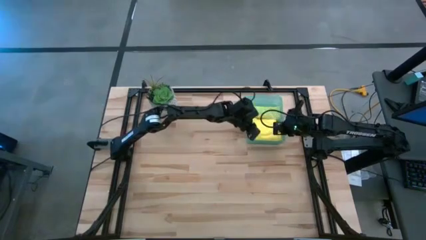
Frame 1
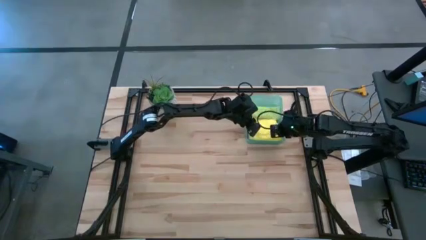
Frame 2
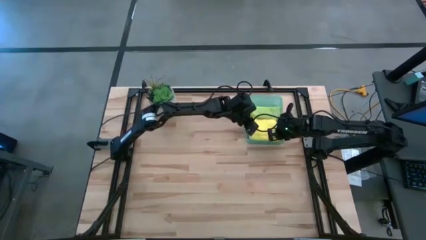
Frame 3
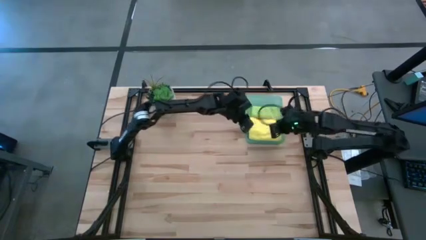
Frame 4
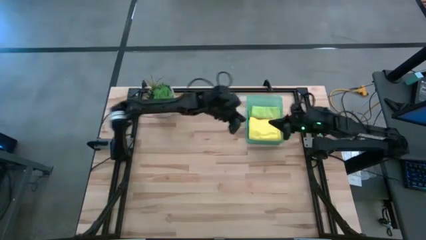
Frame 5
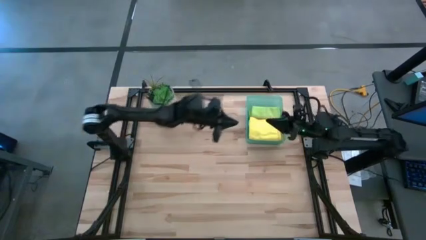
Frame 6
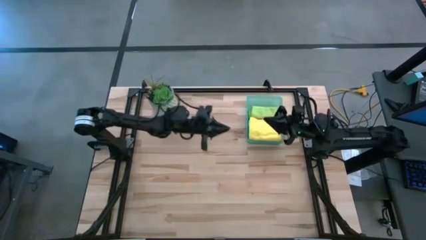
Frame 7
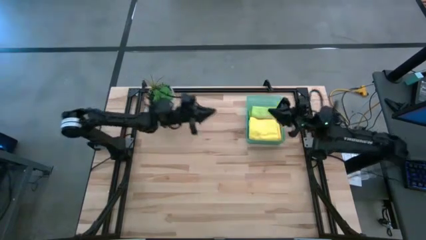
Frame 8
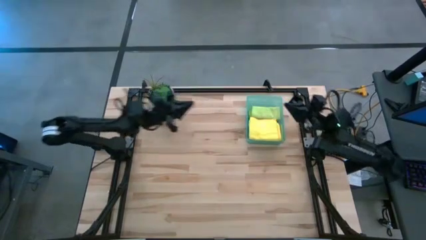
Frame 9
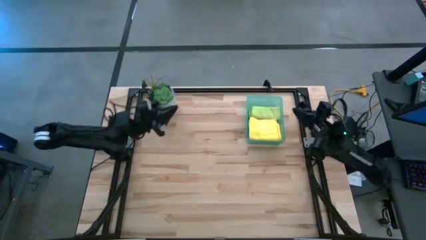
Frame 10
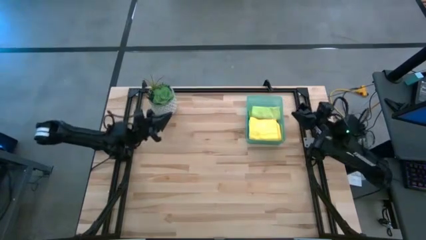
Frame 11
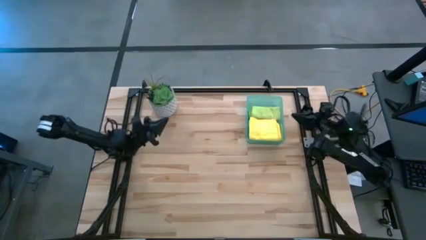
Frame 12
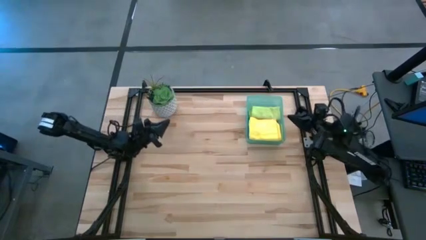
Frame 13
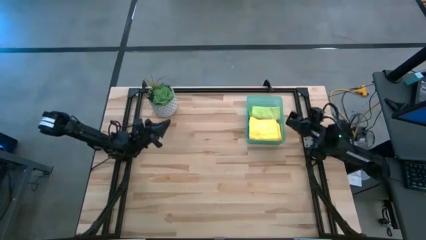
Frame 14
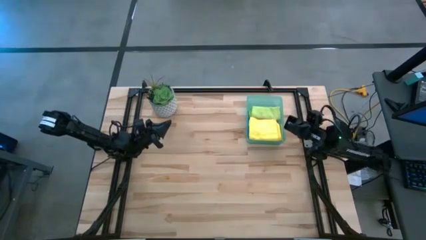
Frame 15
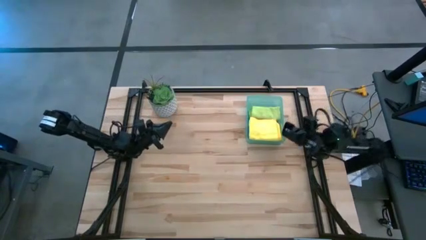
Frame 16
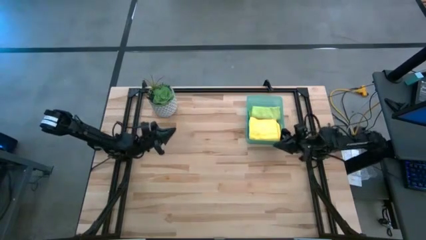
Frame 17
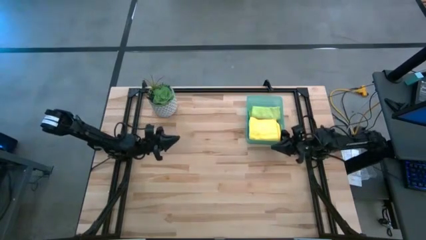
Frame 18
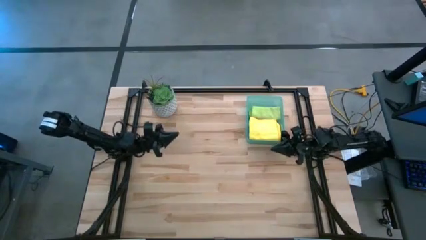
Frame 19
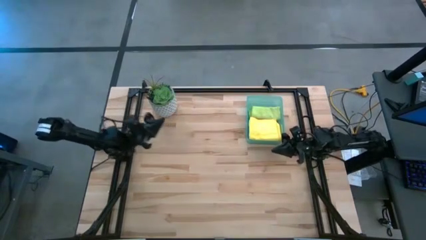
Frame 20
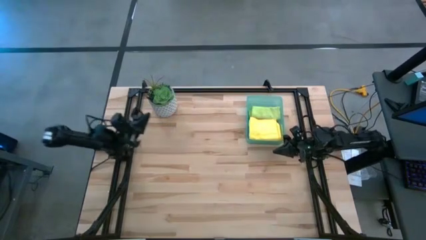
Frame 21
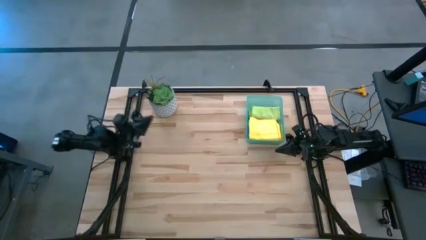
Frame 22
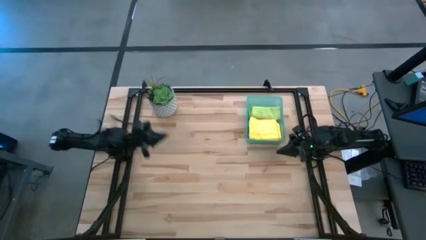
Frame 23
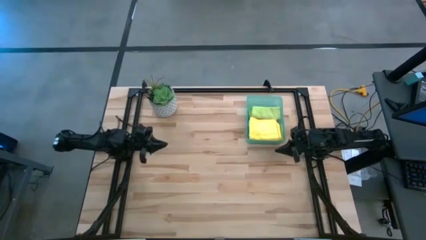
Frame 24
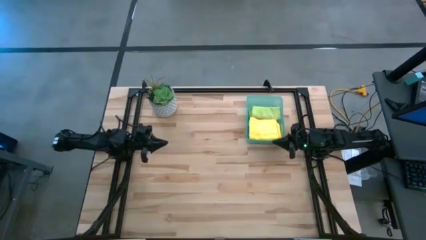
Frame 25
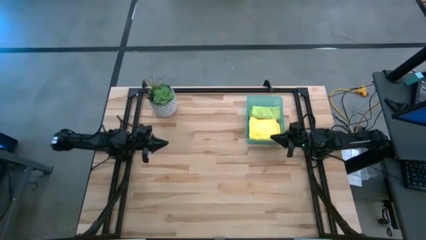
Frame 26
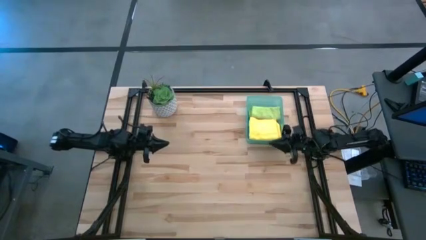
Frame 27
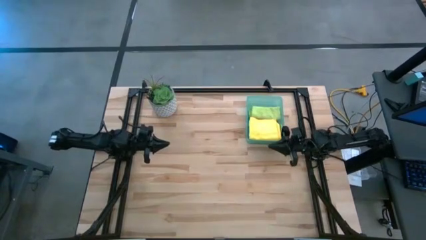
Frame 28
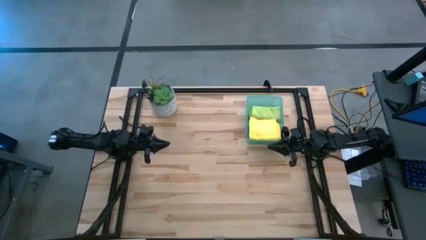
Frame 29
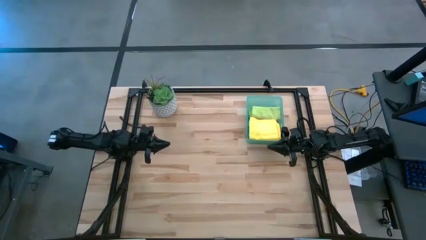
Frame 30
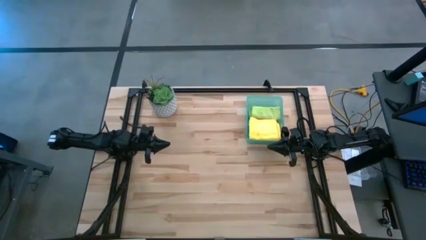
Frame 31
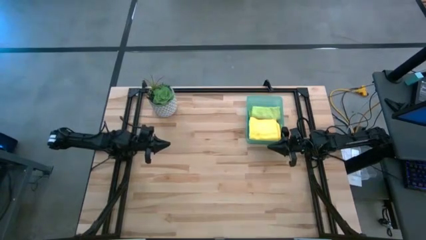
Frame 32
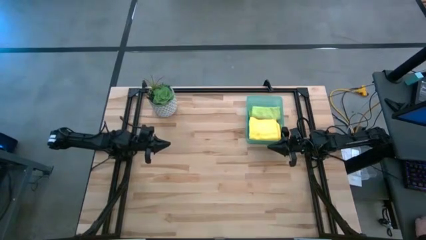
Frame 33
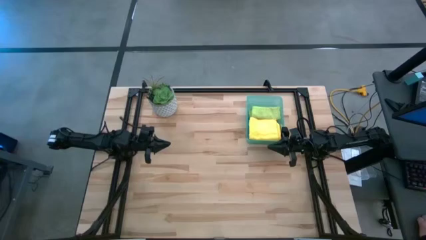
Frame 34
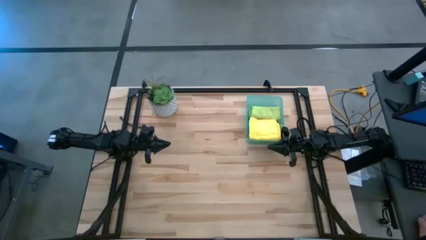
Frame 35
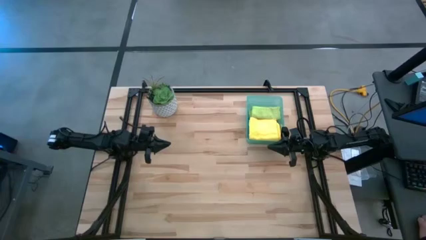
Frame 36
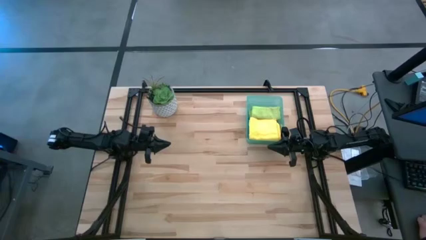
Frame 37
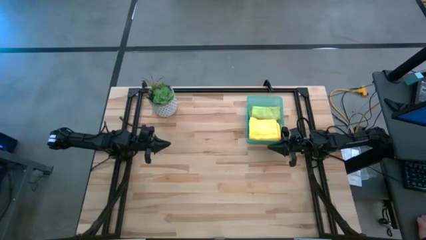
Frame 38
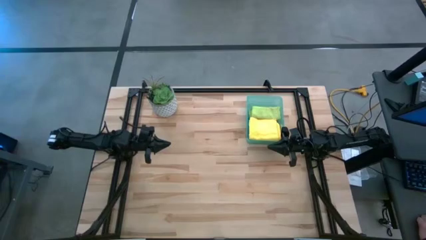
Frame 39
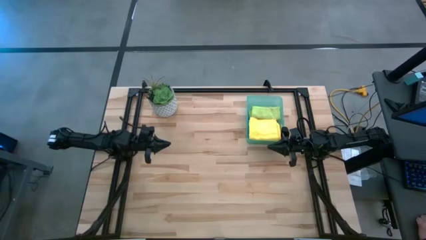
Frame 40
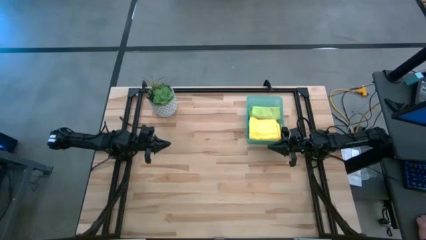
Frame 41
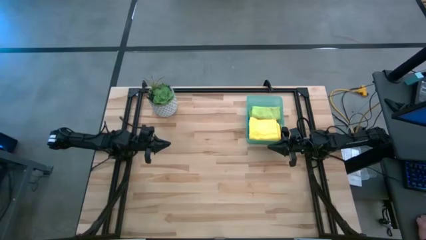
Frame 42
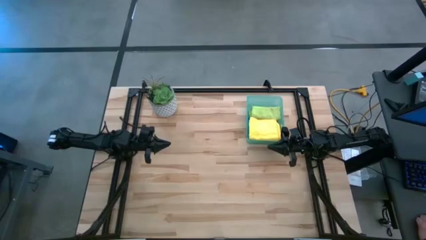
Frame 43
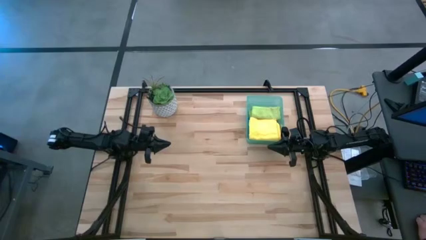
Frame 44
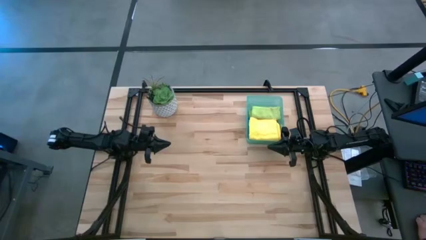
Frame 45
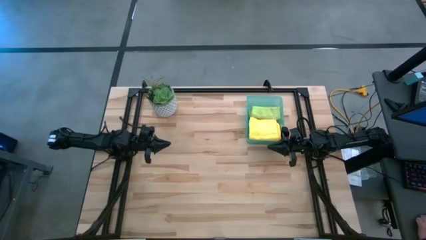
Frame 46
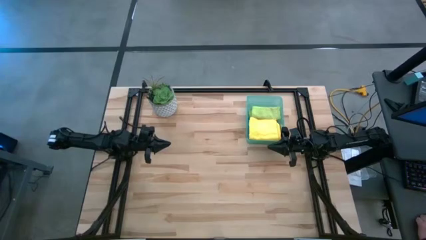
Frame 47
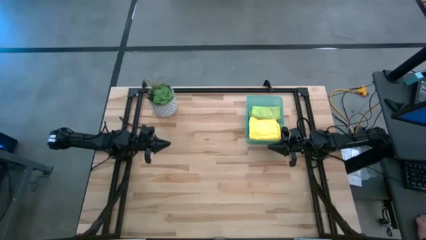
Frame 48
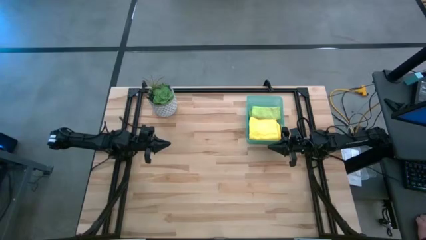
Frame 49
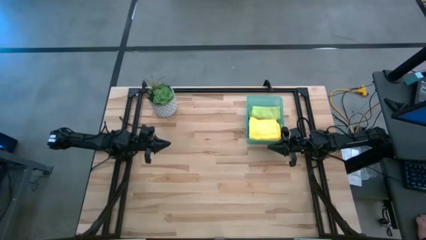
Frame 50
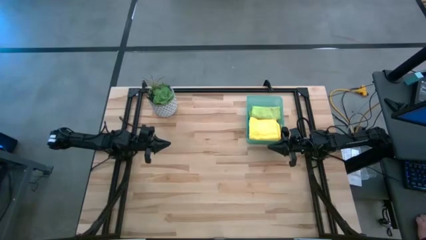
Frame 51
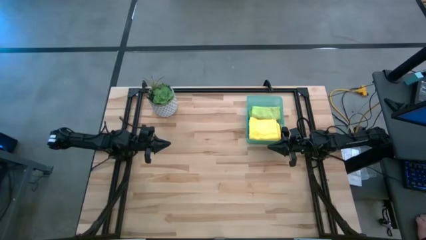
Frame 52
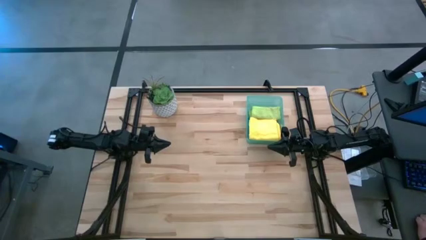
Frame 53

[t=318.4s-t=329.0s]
Task: Fold microfiber towels
Return to Home Position

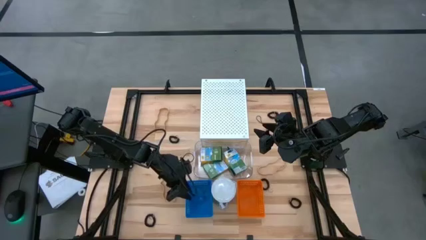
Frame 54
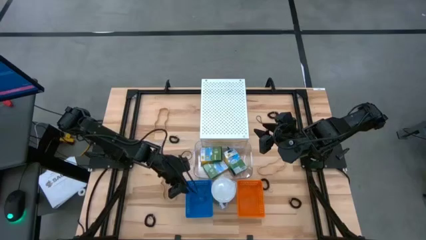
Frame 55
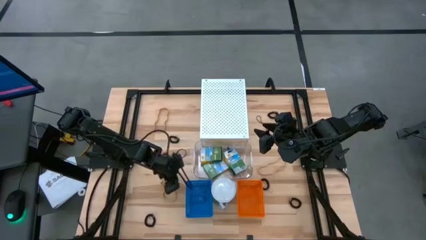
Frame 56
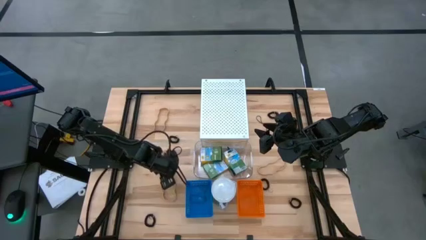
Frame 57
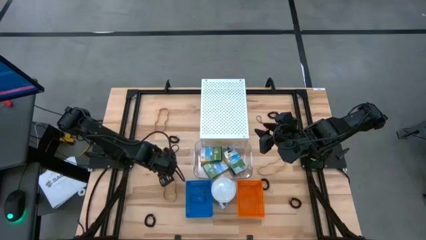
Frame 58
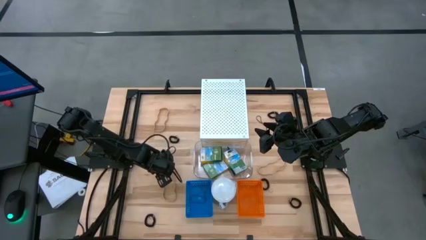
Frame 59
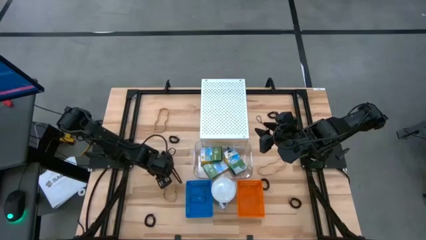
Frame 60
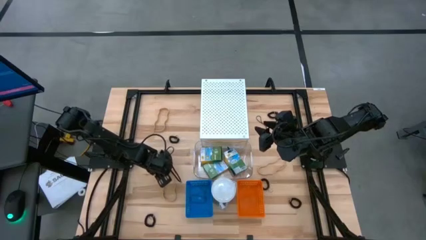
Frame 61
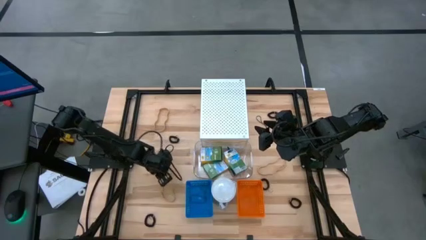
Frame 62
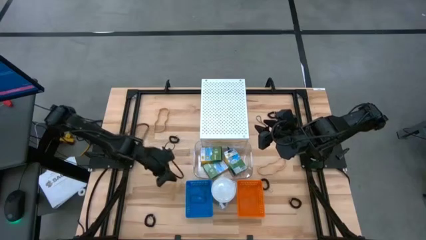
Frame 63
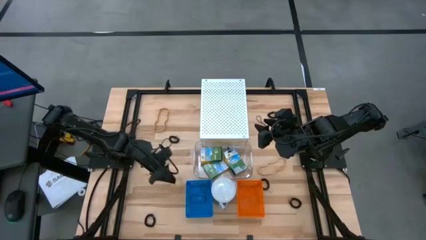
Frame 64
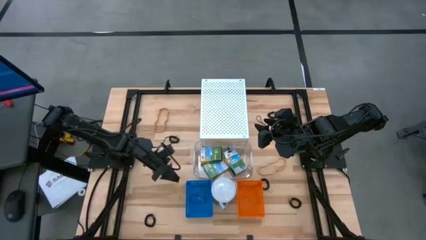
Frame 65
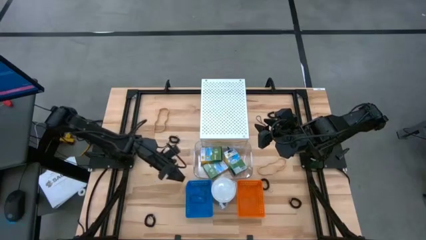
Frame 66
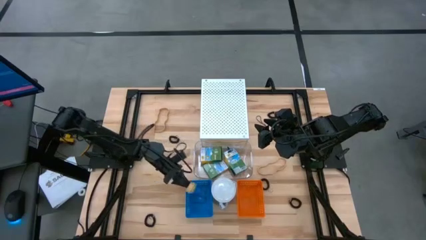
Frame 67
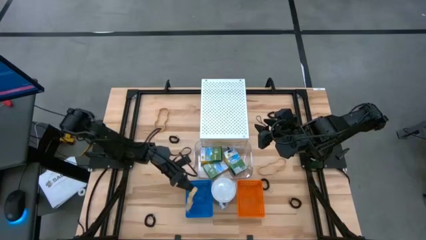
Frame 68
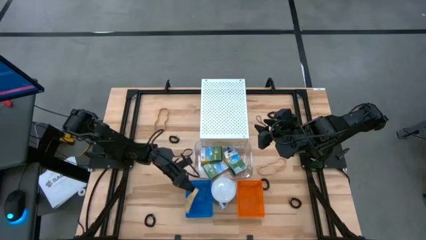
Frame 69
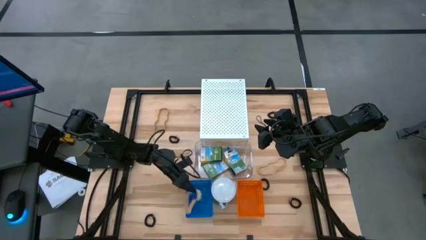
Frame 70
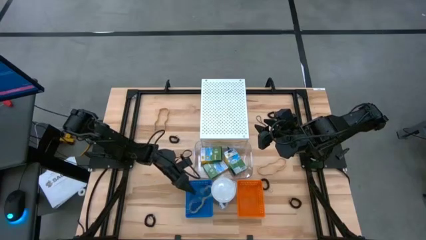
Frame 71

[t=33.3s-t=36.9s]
Task: Pick & Place Office Desk Supplies
Put the brown rubberband into the blue bin
